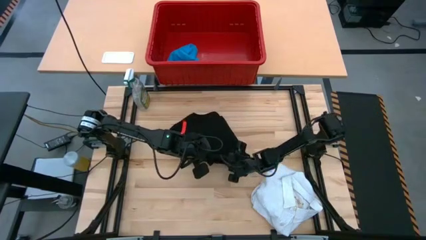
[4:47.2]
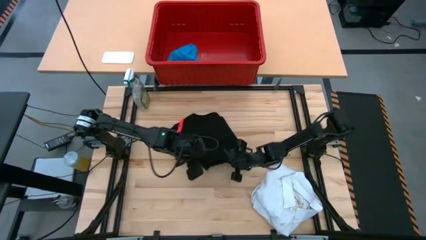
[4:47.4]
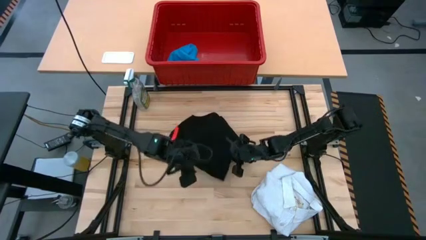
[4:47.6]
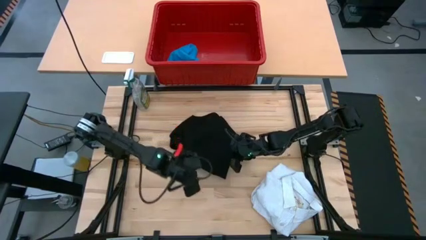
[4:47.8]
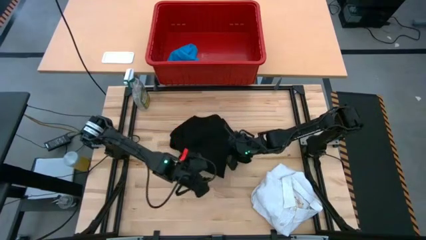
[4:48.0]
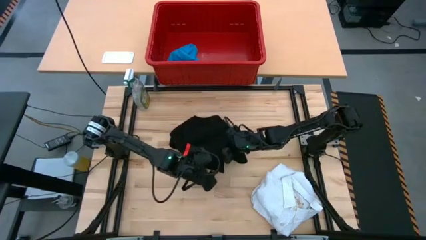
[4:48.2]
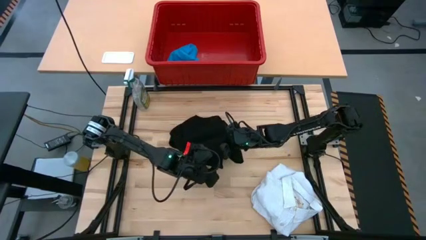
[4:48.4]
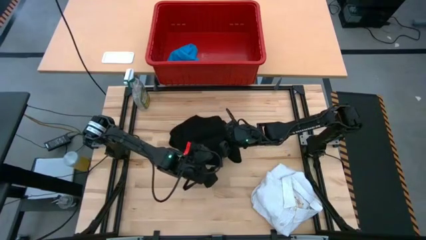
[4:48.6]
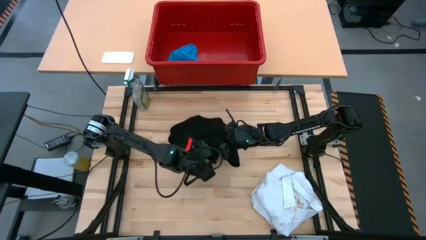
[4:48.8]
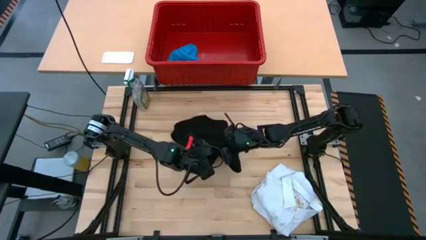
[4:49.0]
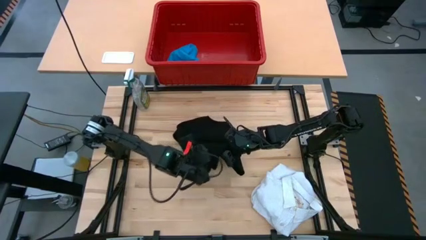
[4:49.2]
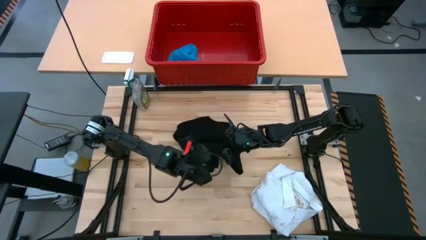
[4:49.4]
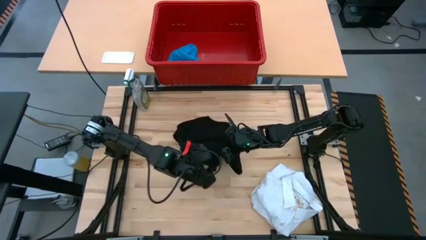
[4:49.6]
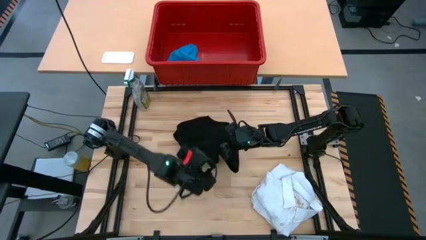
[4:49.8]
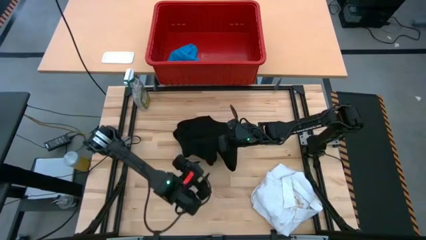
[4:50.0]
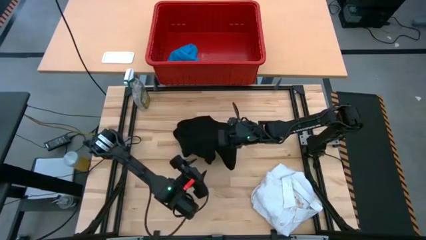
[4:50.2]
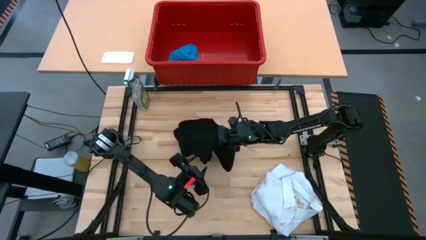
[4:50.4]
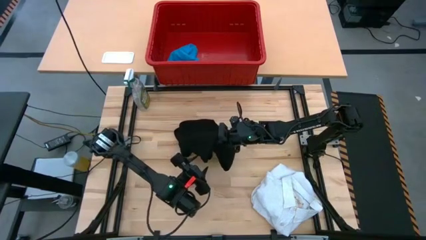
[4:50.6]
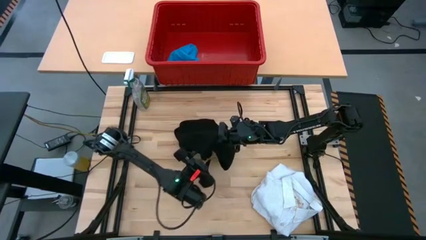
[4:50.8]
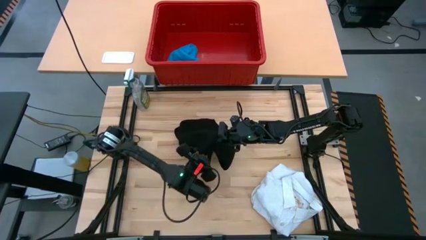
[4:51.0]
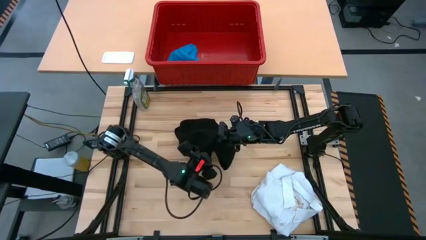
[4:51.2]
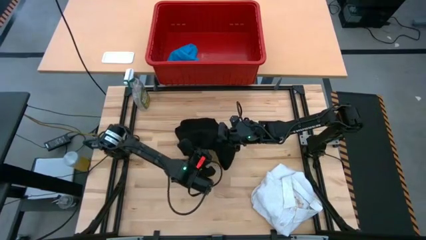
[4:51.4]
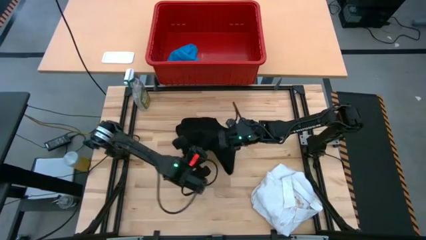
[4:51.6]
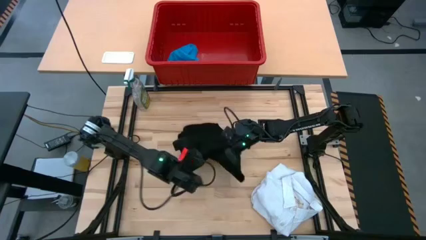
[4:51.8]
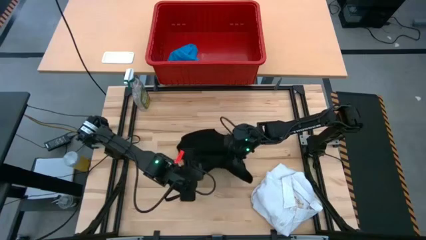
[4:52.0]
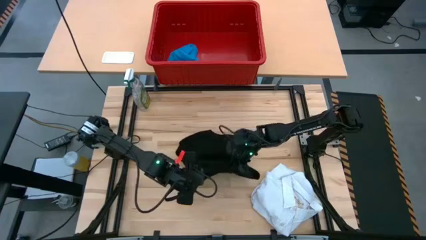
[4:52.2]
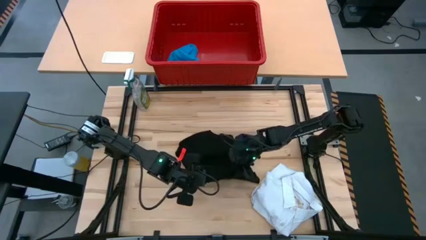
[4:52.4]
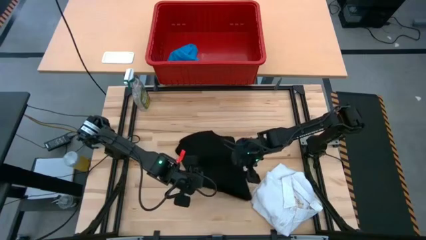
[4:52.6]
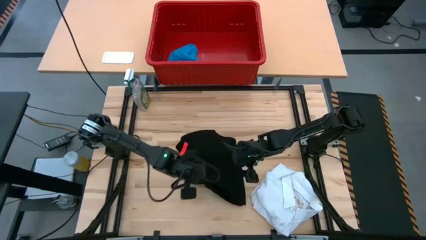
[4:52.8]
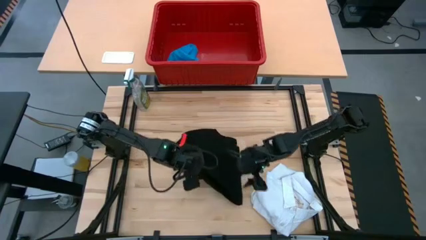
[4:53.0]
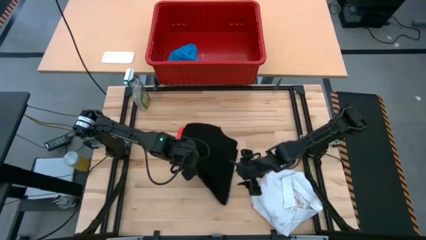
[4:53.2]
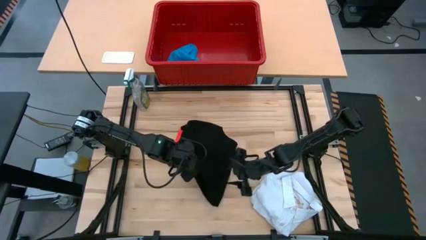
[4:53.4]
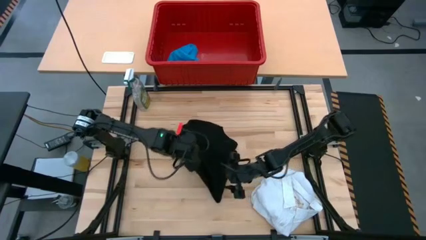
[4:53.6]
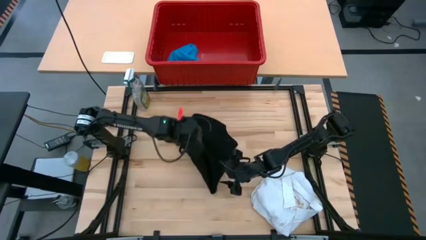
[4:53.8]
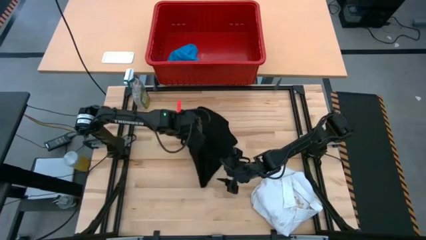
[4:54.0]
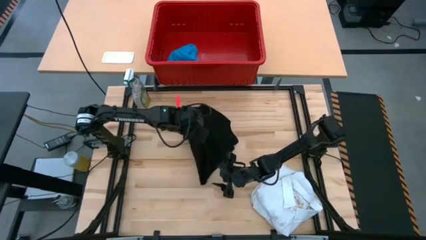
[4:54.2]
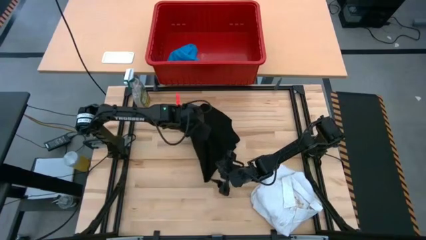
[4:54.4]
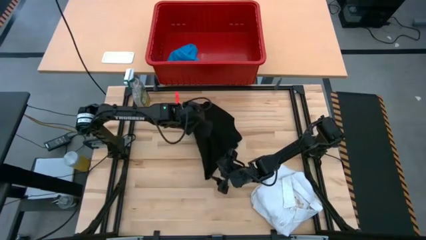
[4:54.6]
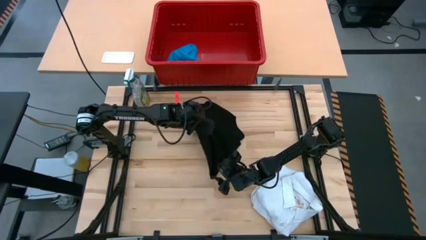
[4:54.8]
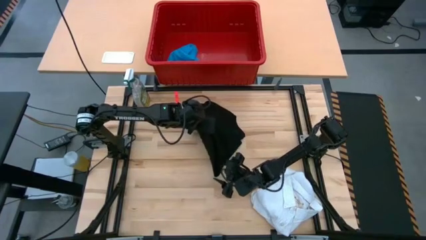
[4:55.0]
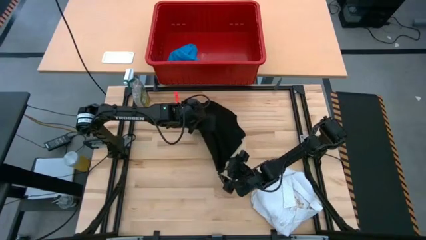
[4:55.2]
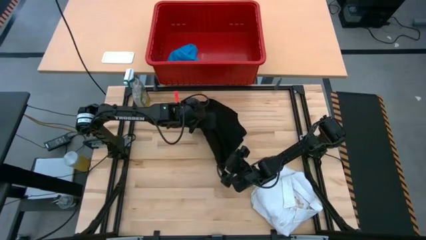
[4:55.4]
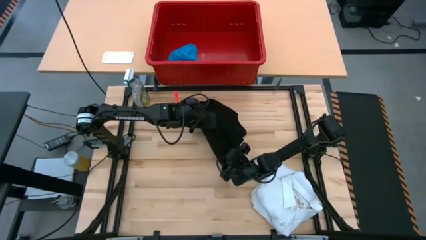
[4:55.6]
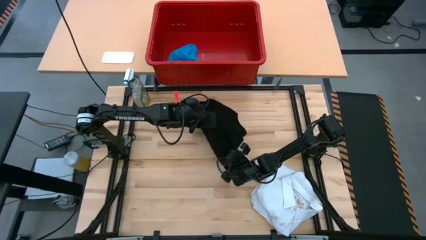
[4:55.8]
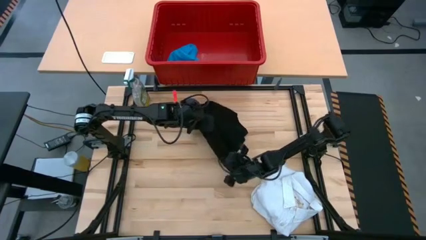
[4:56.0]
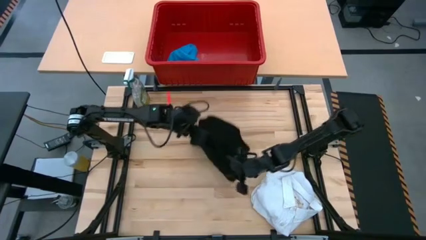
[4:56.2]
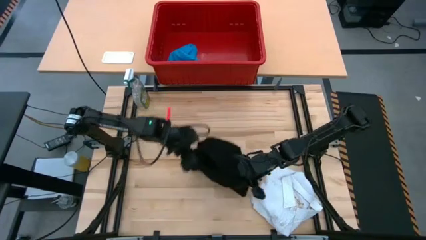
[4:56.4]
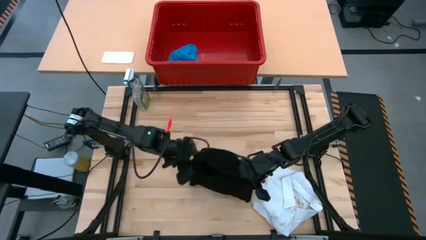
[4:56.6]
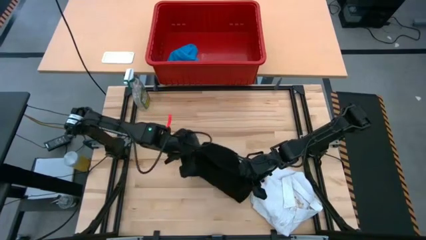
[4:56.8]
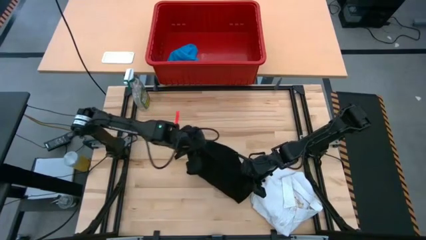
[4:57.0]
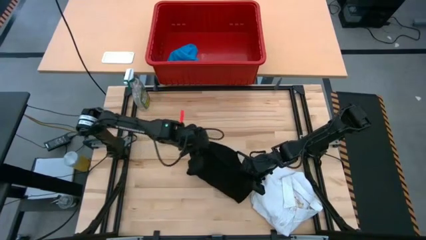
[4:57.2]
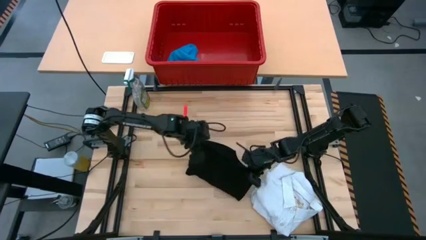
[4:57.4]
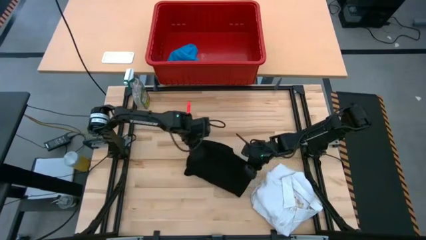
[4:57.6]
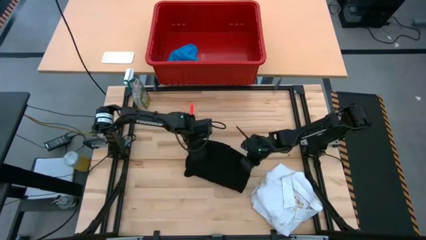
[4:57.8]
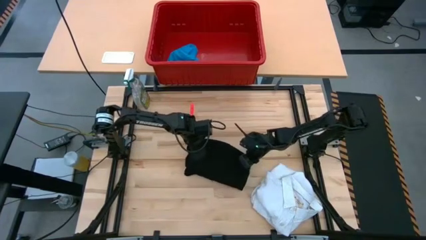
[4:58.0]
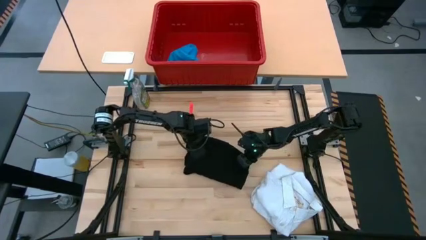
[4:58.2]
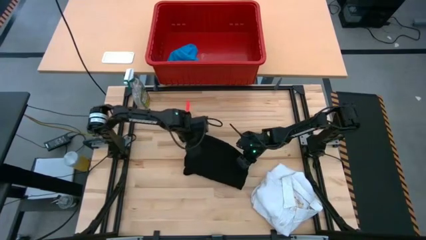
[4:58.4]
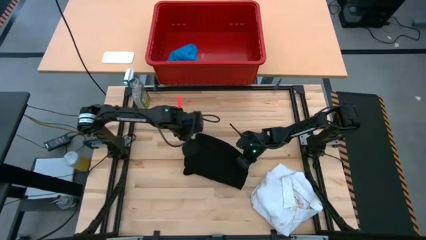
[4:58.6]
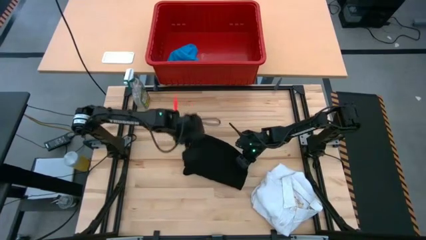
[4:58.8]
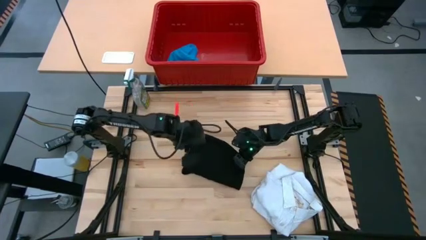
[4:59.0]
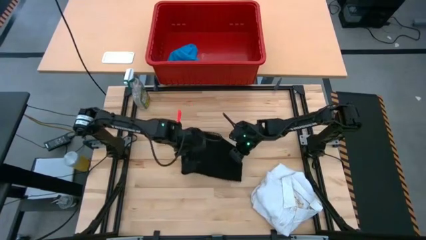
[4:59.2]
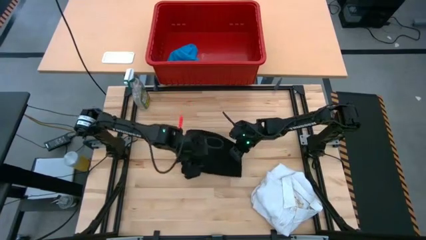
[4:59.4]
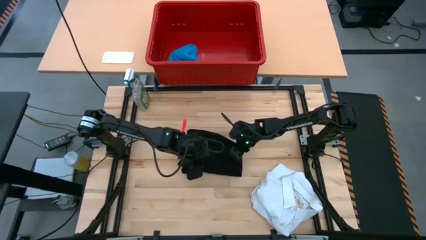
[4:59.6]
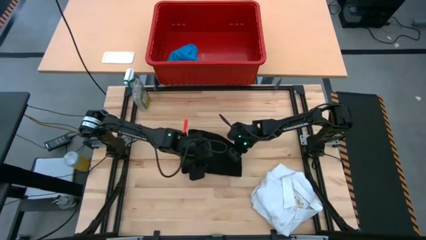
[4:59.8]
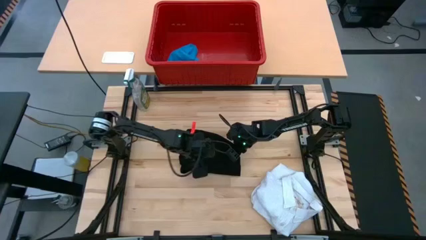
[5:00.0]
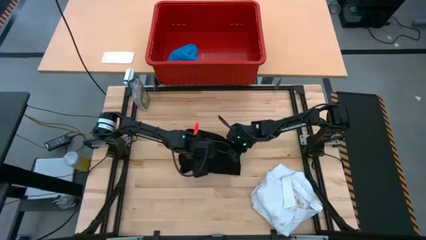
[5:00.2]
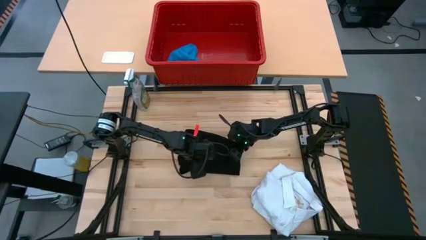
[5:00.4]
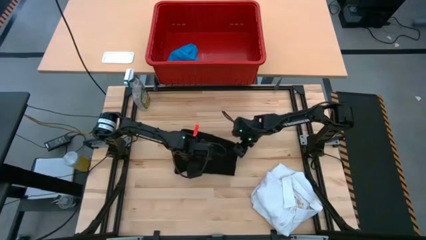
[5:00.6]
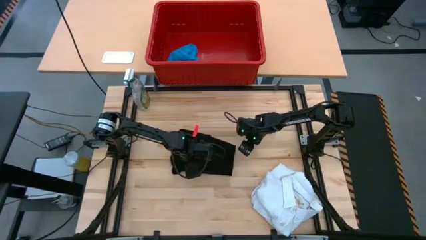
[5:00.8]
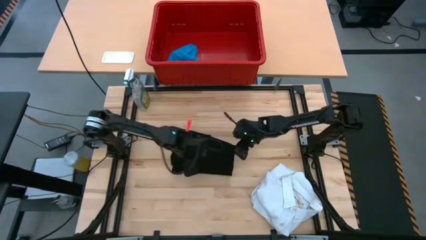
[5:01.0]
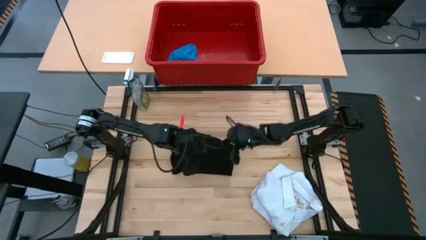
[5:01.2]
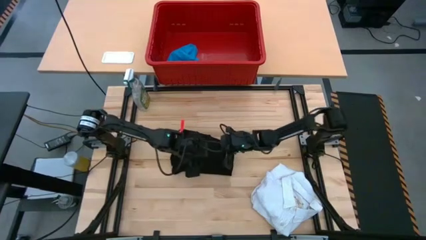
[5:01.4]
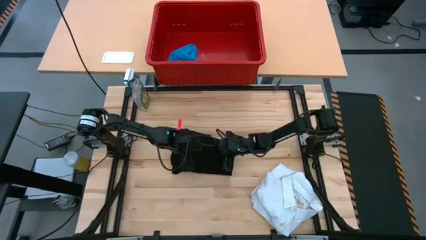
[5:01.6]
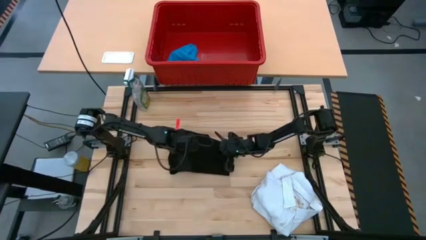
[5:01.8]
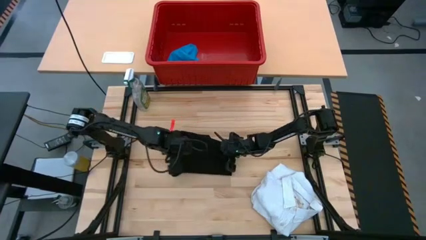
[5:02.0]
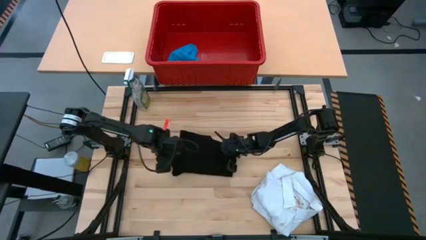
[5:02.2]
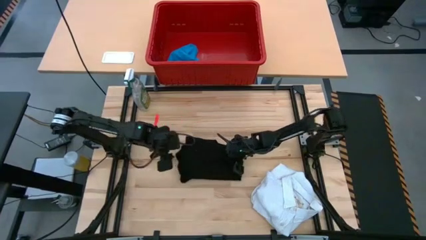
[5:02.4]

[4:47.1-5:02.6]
Task: Fold laundry
Fold the black shirt

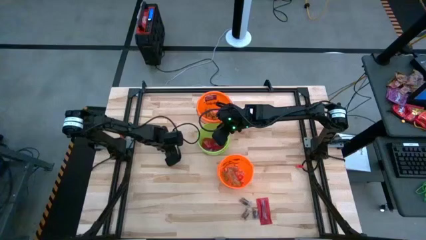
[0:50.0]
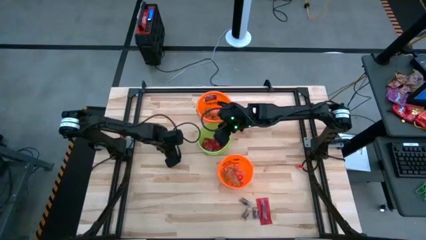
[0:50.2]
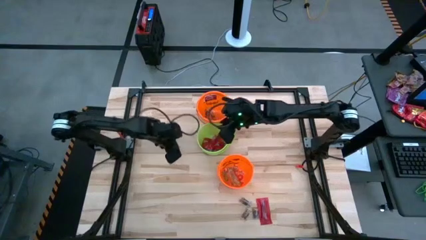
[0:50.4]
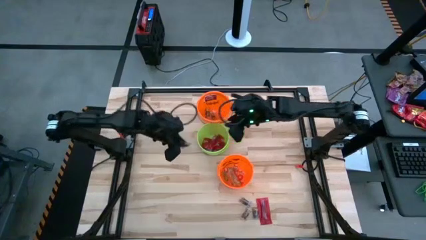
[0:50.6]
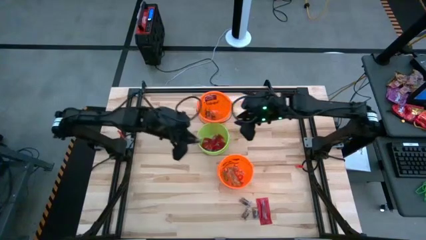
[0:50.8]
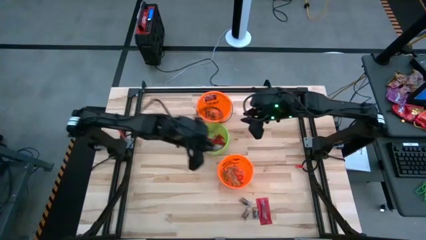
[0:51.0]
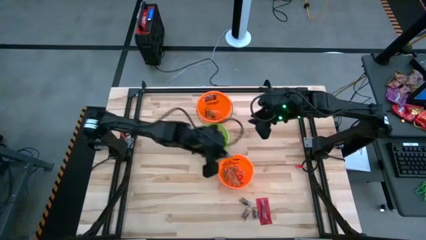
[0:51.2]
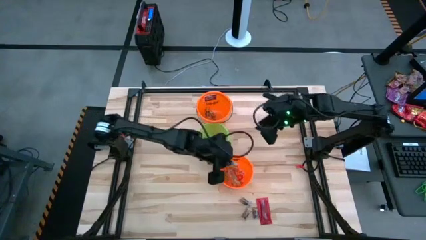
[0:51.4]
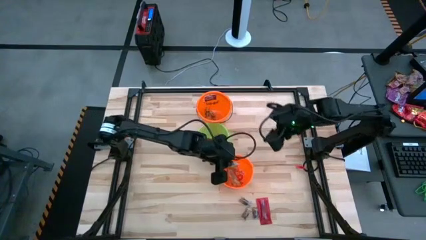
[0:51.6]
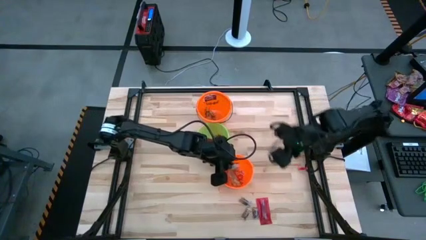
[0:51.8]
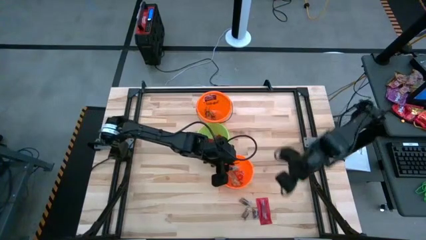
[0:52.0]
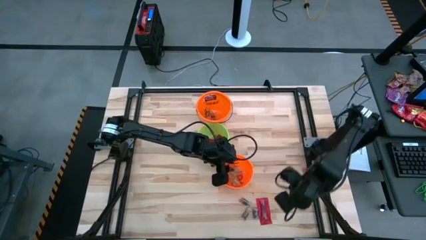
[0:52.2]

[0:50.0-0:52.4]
Task: Sort candy by brand, put in halloween buckets
Put the green gummy into the bottom orange bucket
